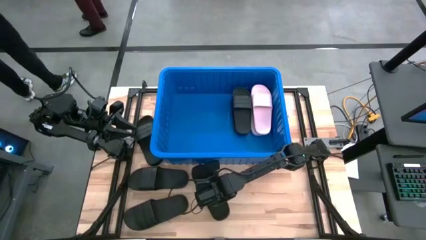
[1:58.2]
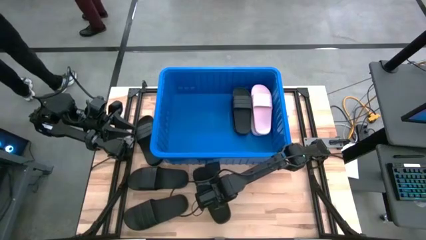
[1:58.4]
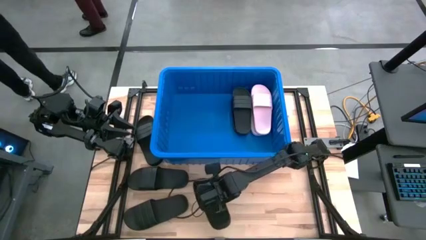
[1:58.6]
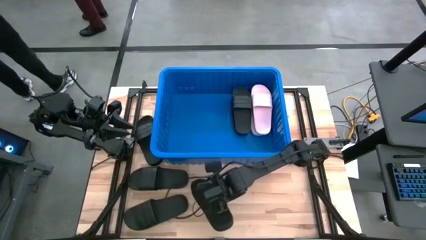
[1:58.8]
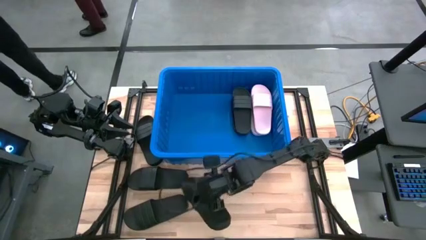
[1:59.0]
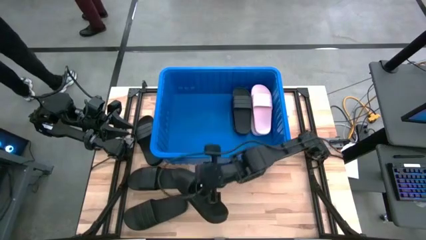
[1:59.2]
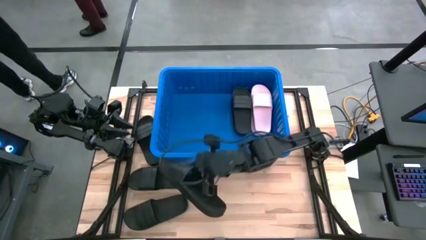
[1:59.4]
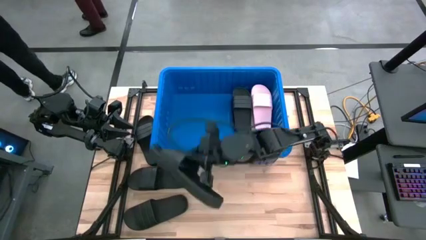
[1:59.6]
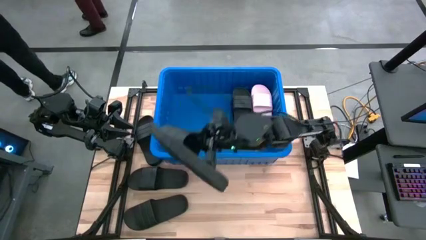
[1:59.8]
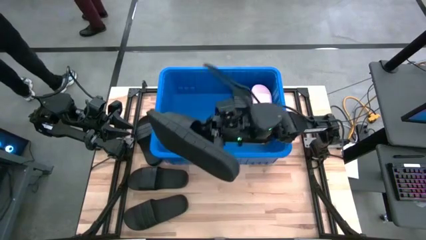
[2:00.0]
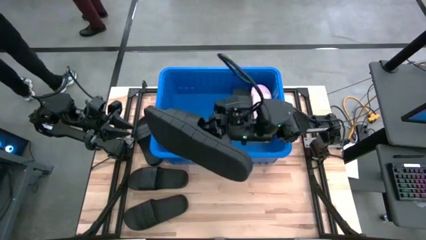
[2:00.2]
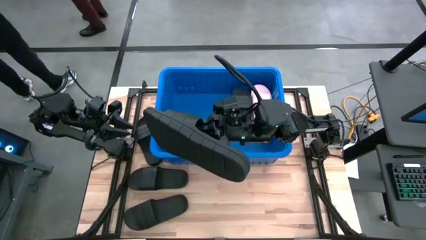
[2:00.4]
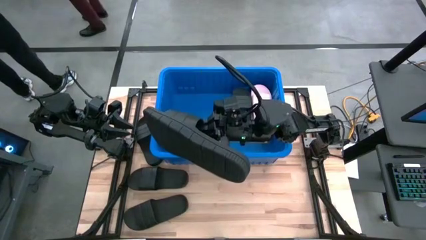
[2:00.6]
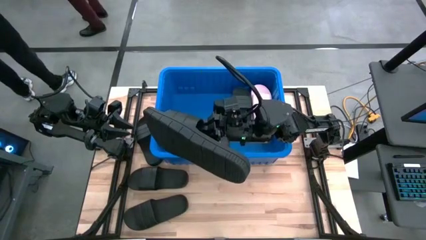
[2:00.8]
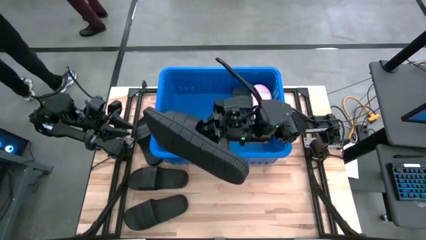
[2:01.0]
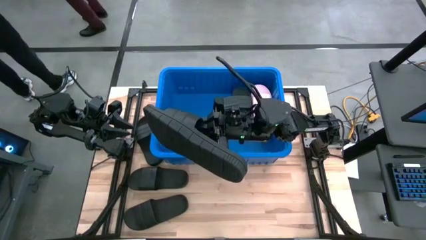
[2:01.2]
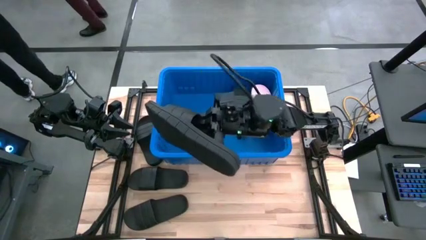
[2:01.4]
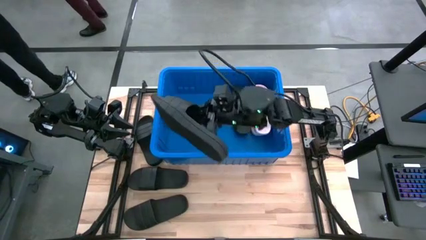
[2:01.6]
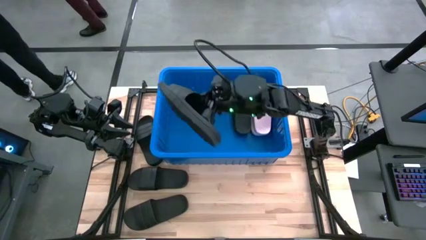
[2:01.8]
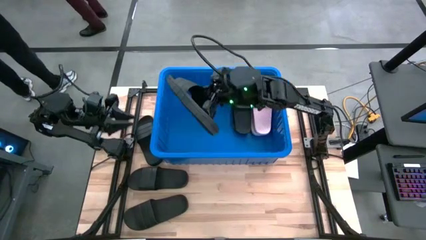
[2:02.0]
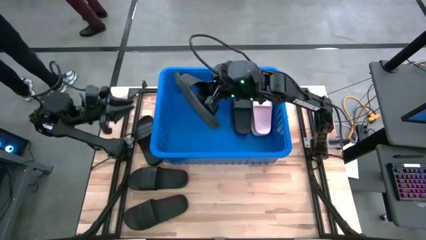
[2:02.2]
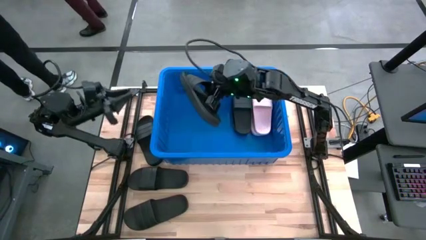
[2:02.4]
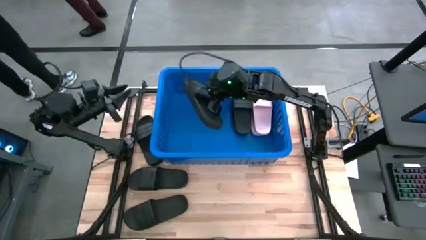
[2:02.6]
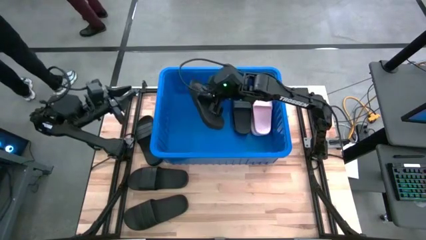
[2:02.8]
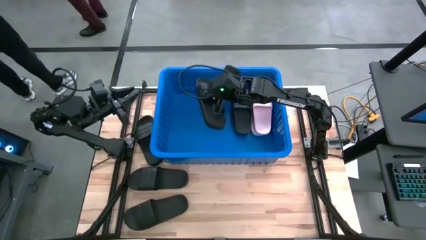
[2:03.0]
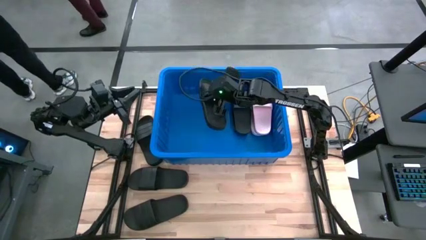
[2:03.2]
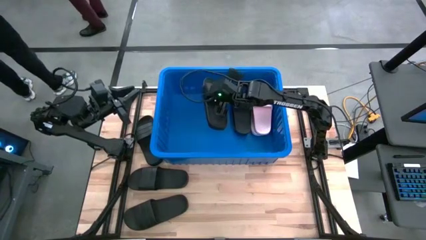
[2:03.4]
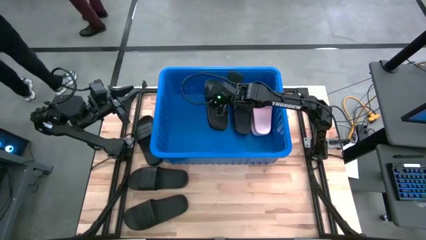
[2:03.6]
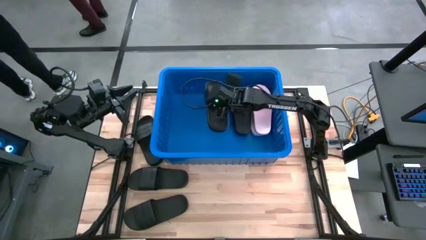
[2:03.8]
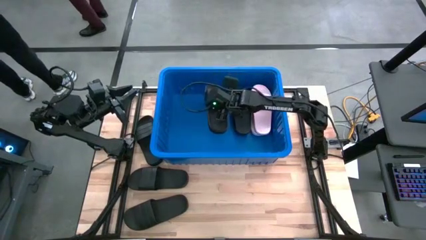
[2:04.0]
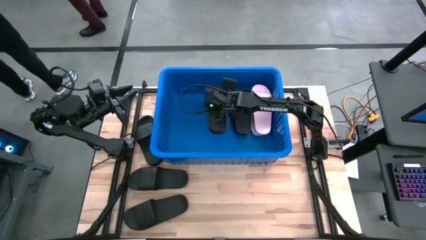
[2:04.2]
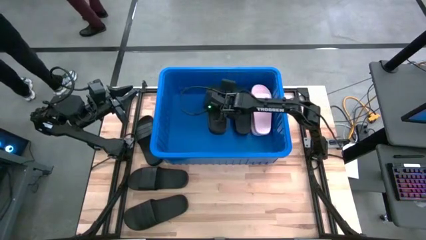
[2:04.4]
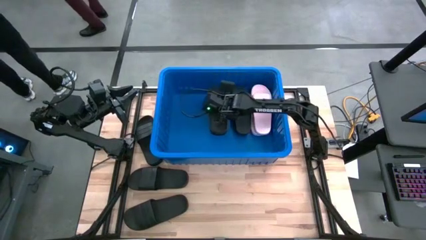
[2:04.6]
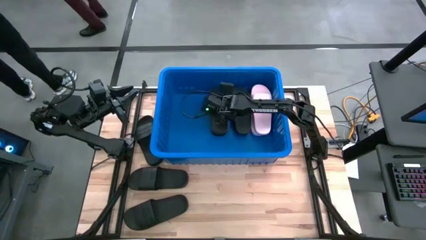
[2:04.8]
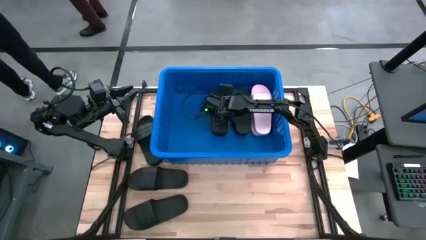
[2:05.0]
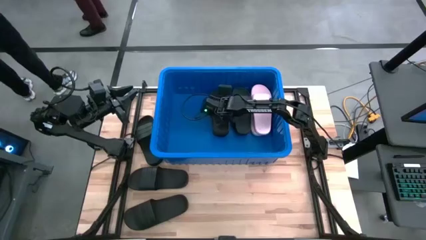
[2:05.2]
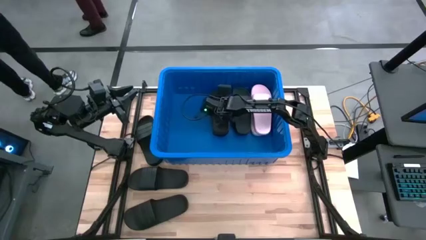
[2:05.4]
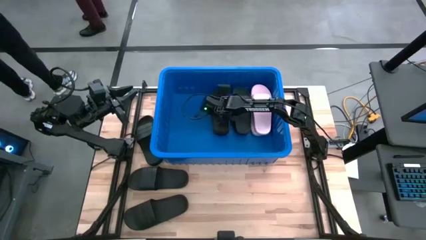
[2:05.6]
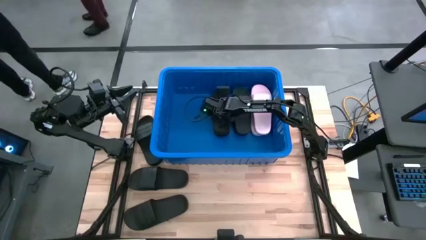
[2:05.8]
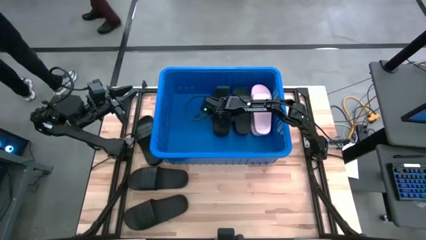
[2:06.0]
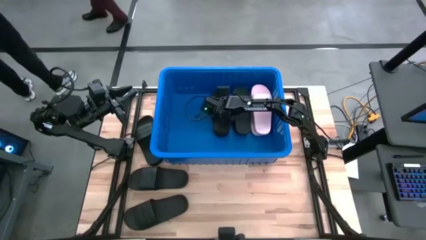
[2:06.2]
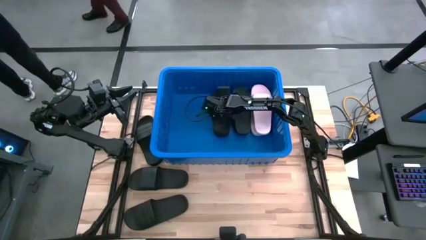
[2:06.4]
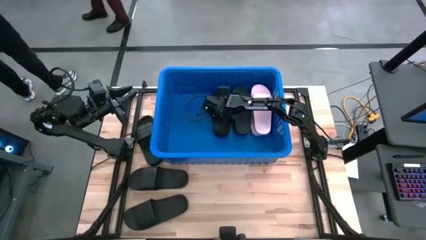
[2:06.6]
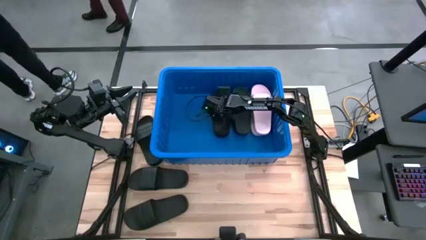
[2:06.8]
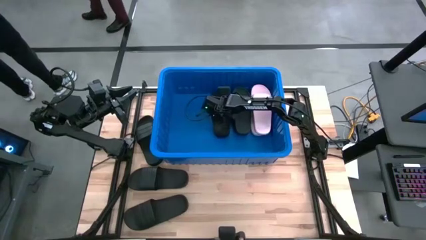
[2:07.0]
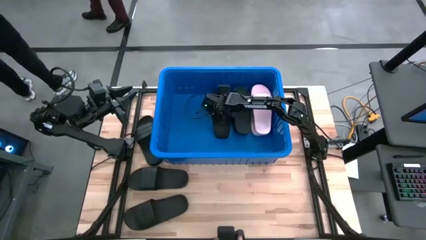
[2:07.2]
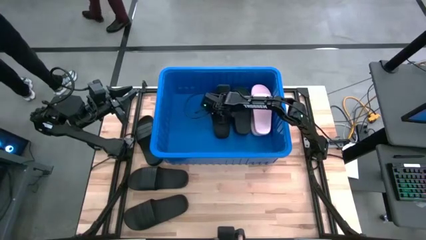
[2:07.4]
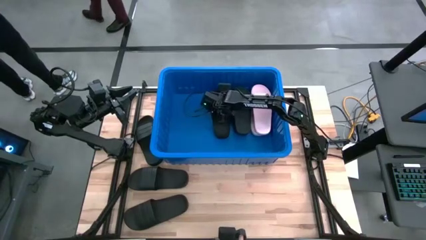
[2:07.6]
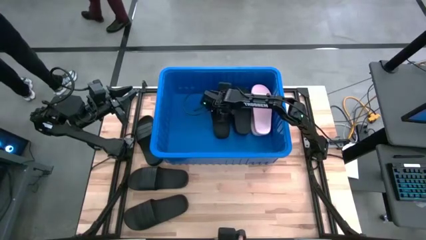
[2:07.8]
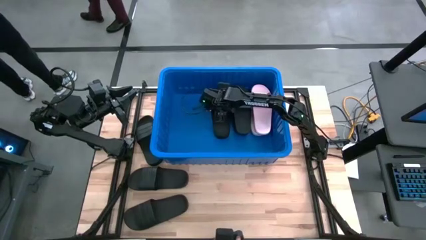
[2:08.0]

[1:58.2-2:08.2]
Task: Pick and place slides into bin
Put the black slide into the blue bin
